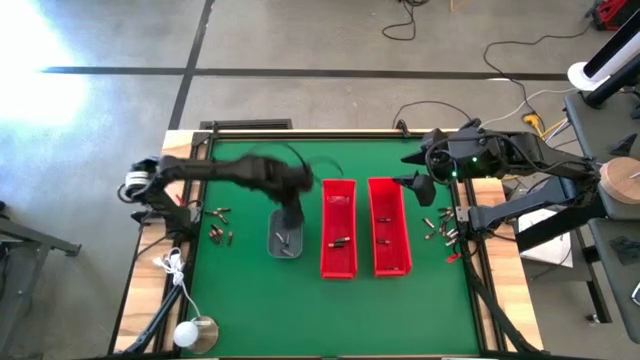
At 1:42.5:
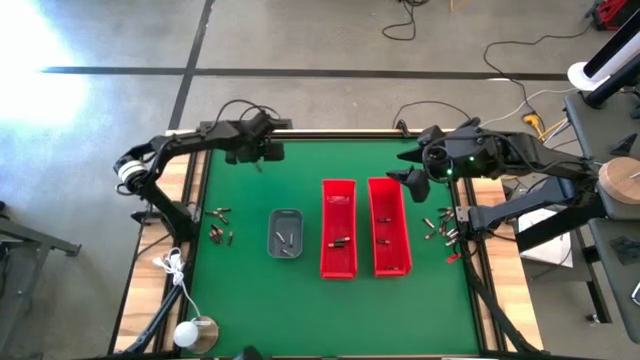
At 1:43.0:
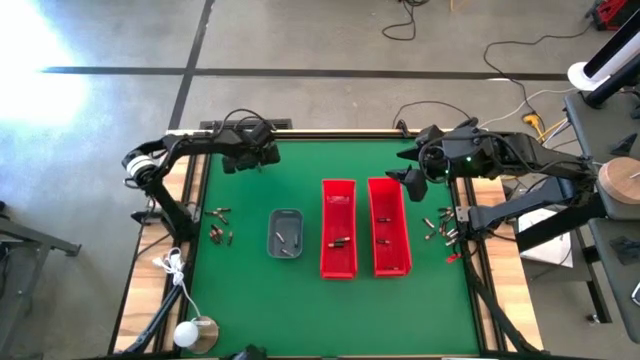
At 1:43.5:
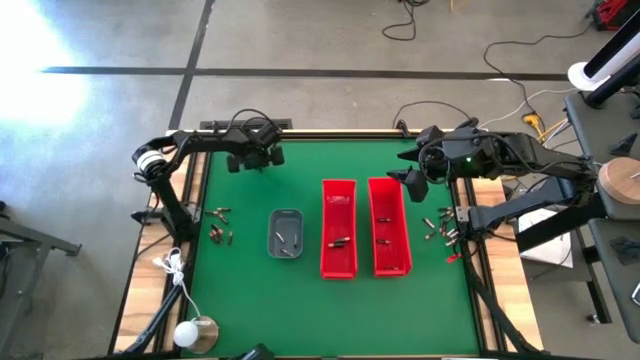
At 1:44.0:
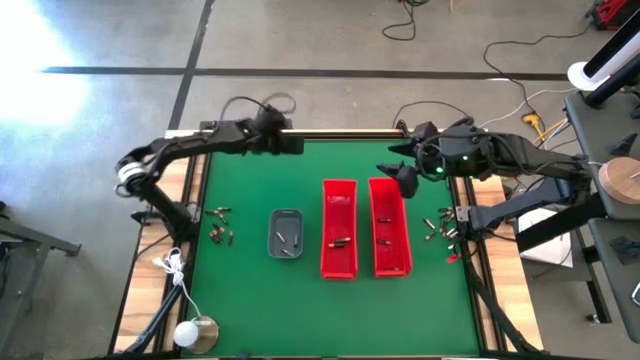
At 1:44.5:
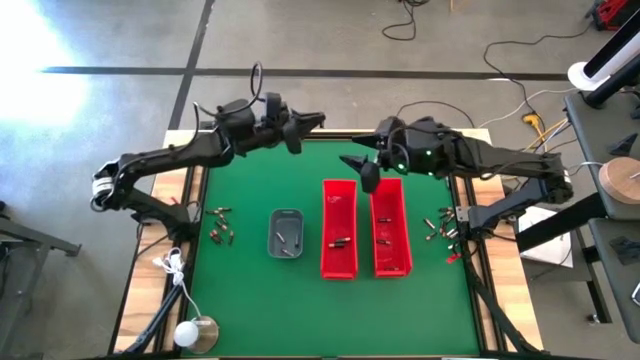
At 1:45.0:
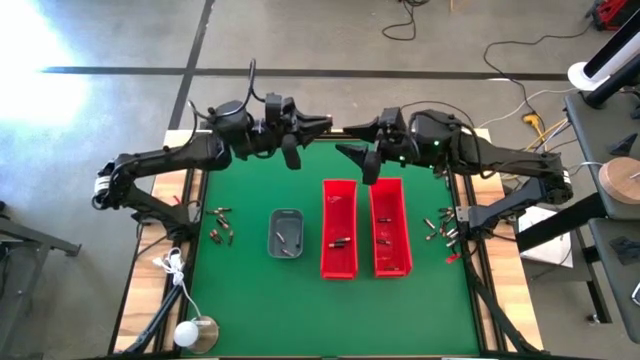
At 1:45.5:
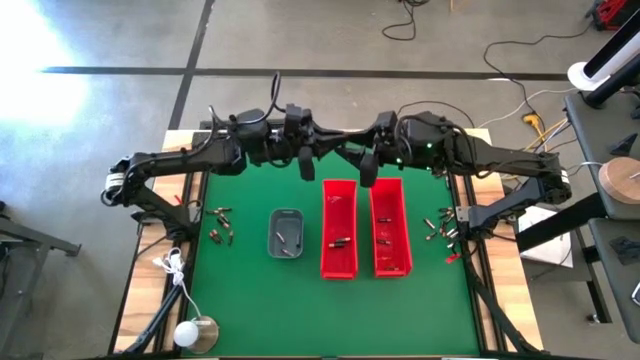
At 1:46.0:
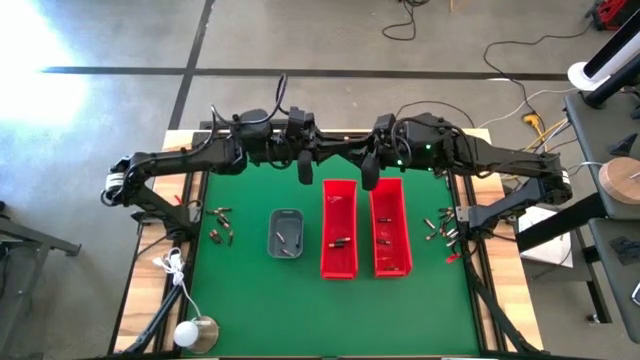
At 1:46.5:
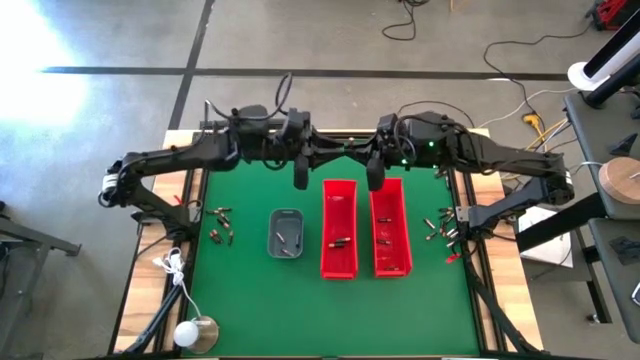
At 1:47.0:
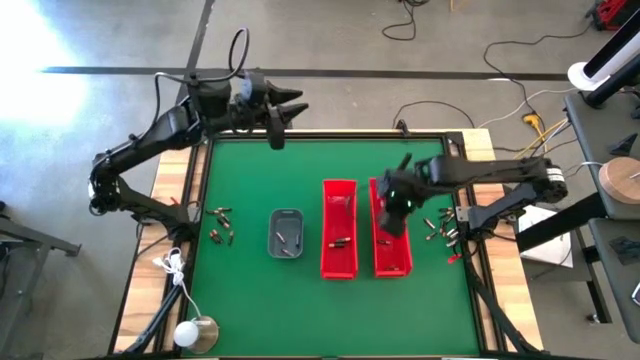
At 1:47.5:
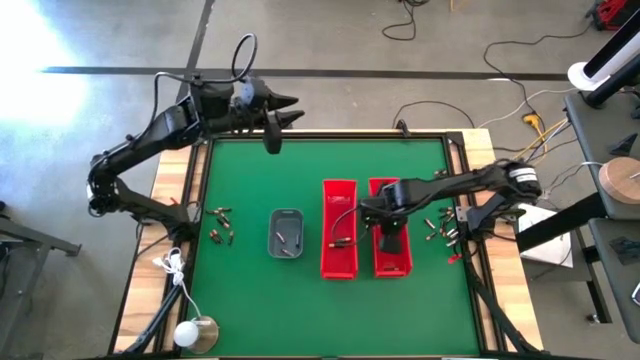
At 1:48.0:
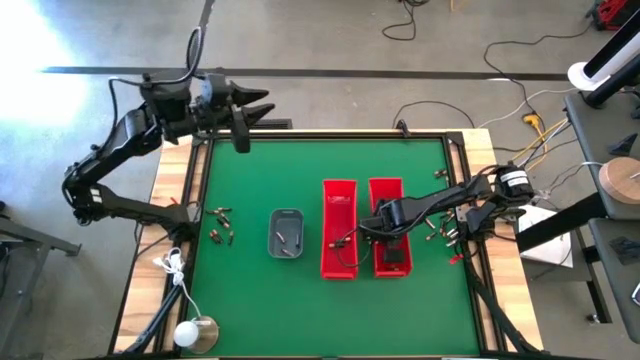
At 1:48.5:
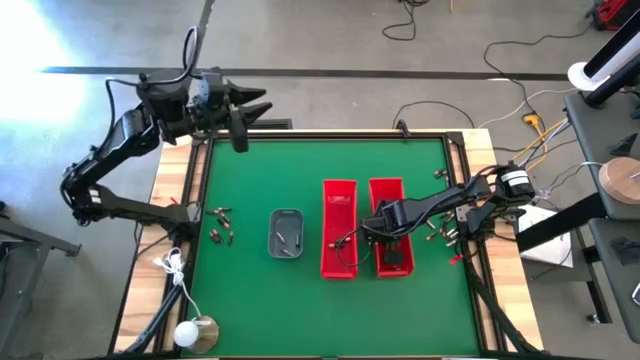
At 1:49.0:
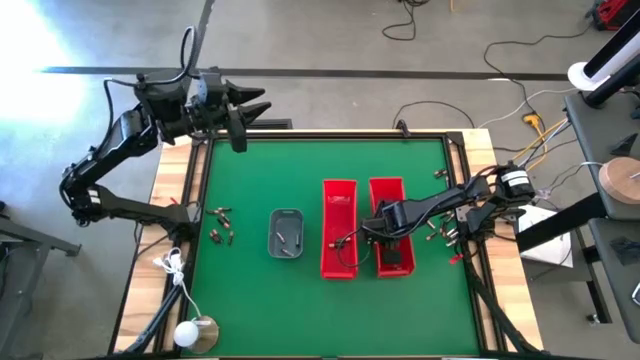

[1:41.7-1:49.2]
Task: Sort batteries
Put the small black battery into the right red bin

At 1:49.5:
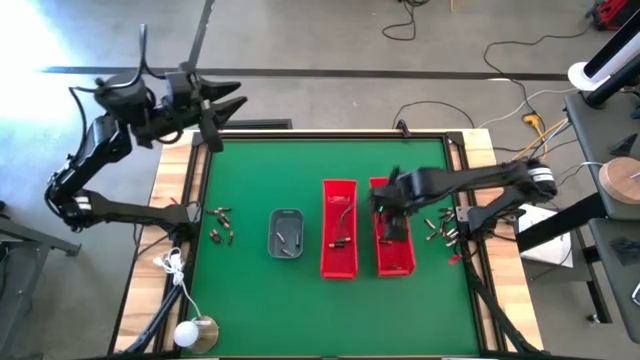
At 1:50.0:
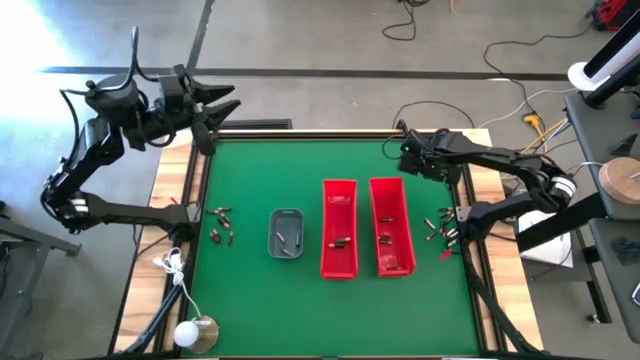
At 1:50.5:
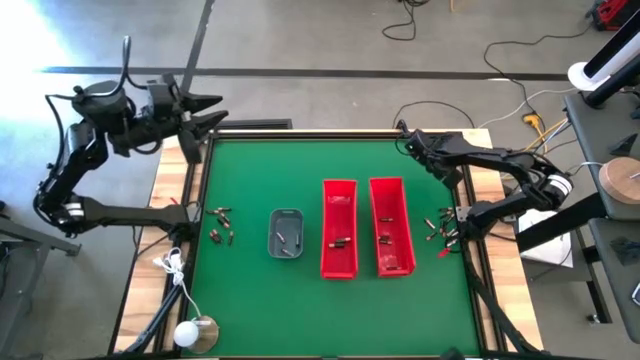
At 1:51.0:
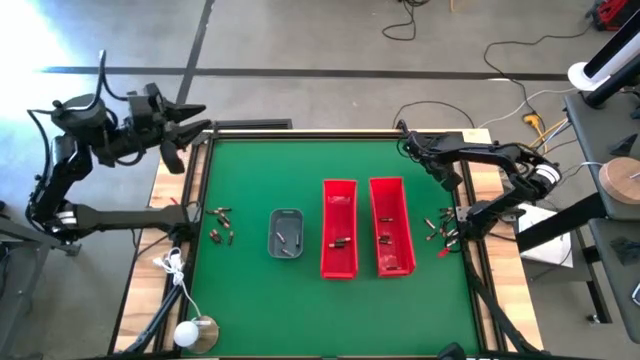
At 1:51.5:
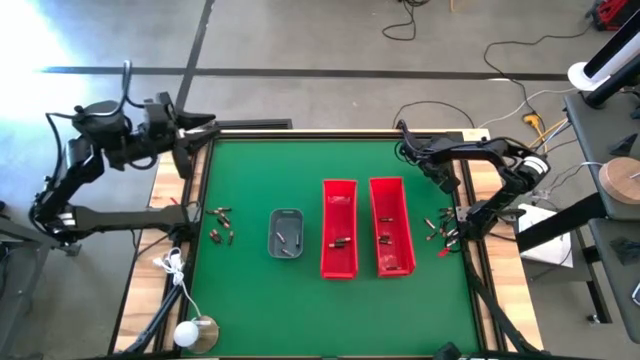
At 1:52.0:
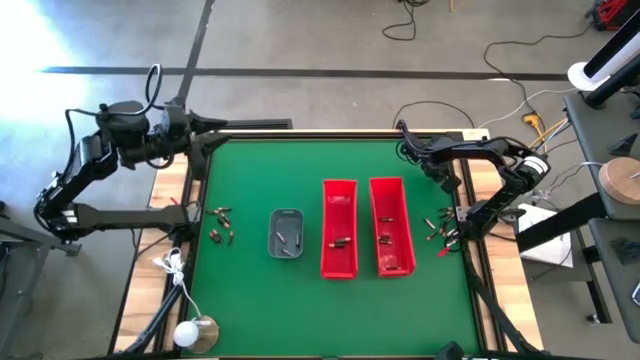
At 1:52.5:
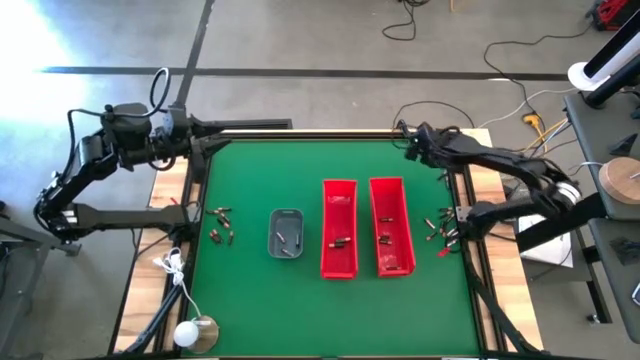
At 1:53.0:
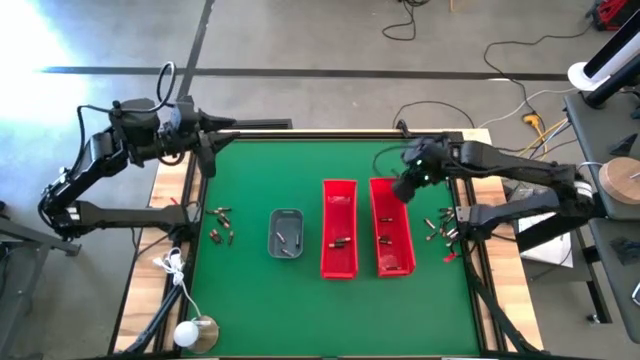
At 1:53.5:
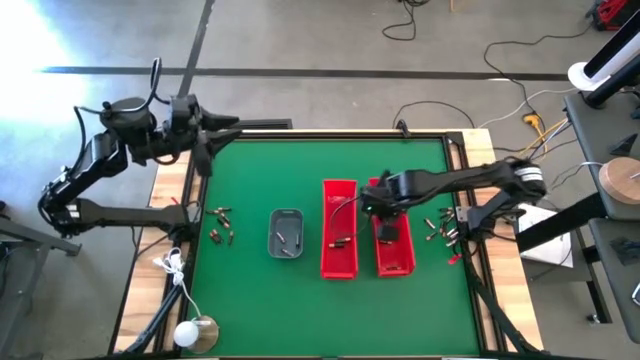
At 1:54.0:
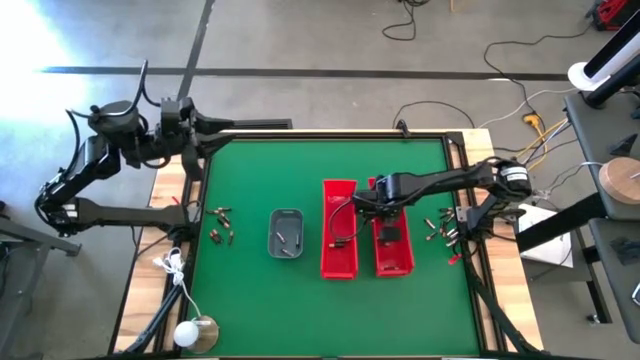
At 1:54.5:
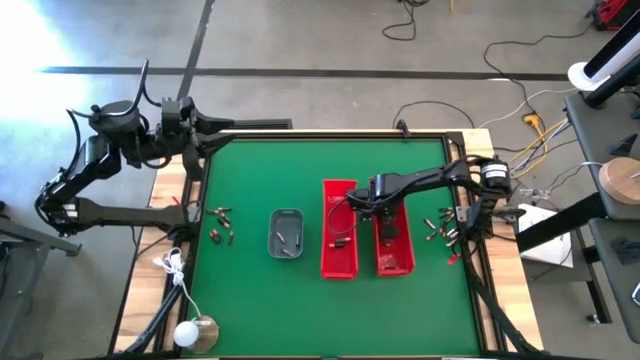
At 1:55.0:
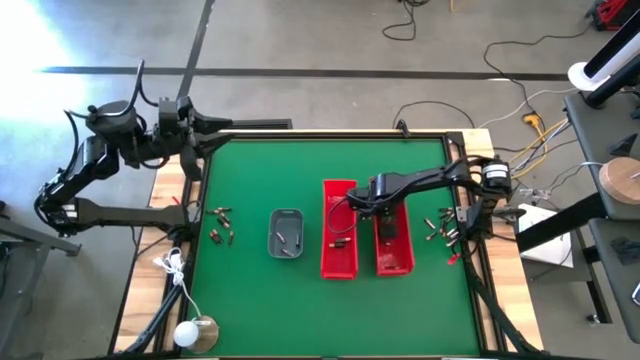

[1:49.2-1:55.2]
Put the small black battery into the right red bin

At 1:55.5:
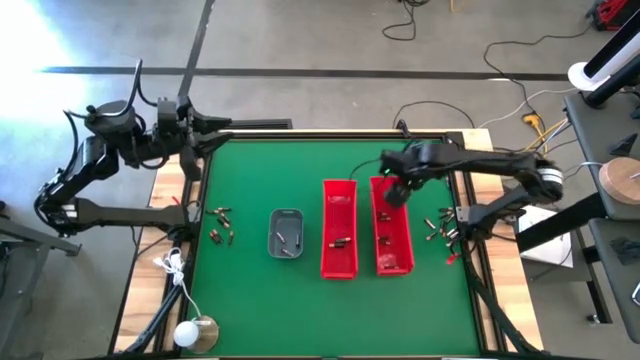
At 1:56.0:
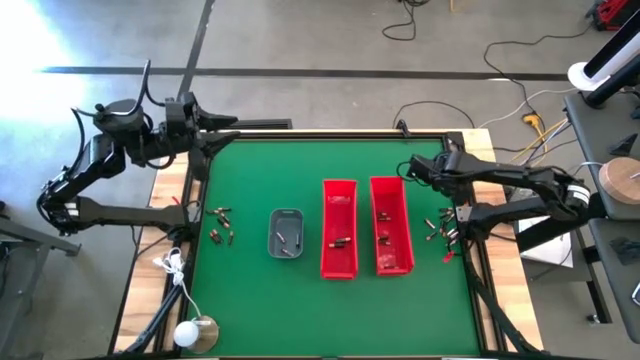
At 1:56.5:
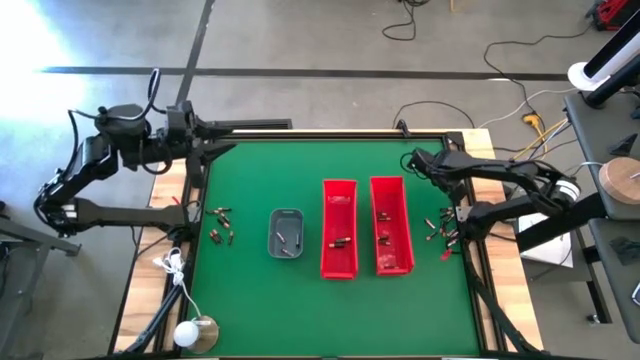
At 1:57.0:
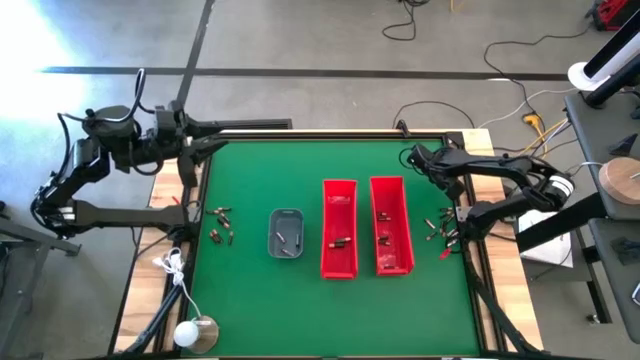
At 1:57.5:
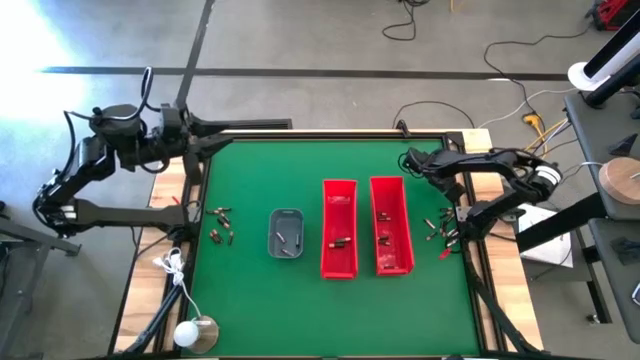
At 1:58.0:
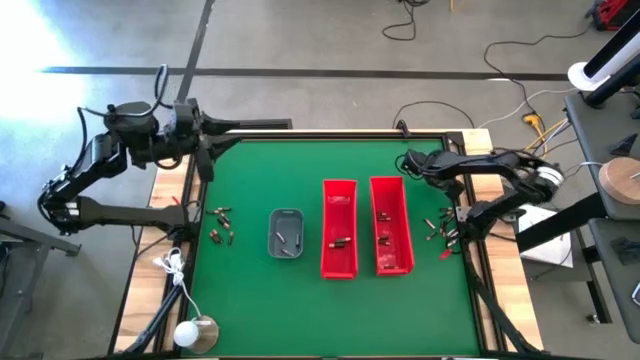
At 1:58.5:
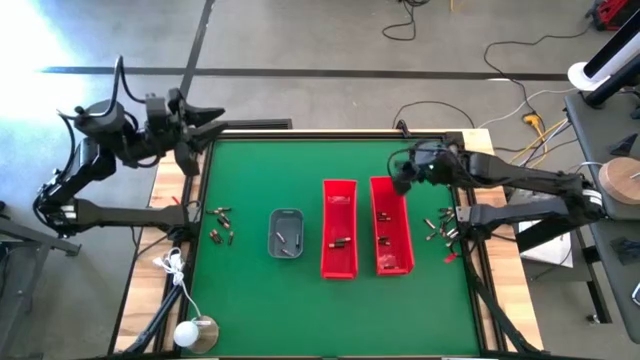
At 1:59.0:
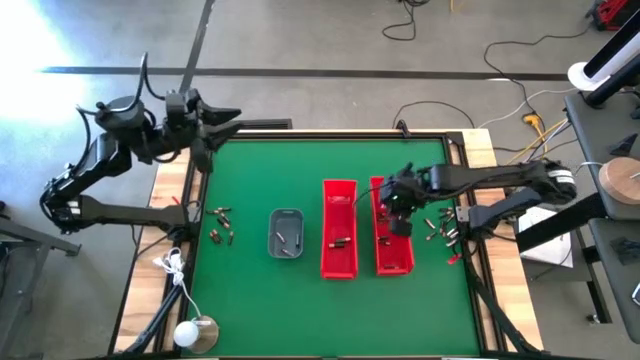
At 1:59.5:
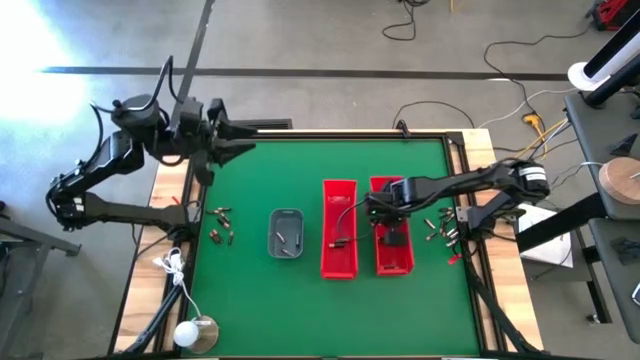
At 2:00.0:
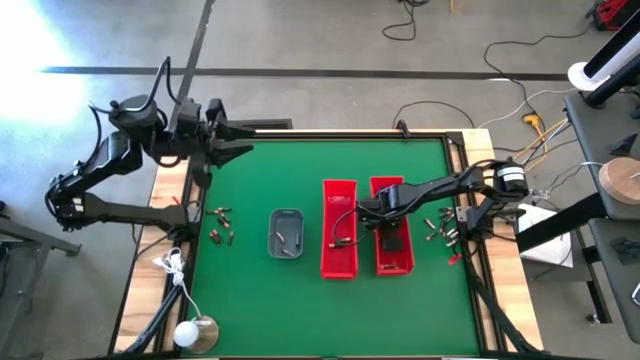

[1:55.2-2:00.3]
Put the small black battery into the right red bin

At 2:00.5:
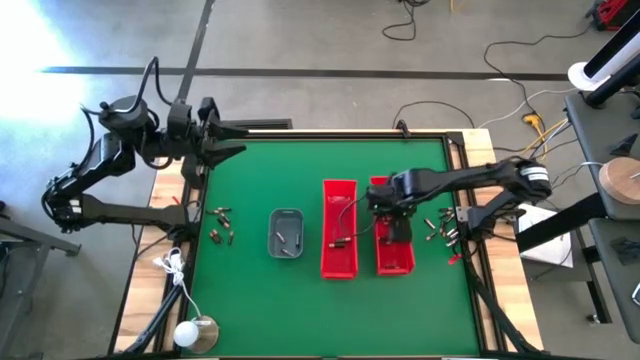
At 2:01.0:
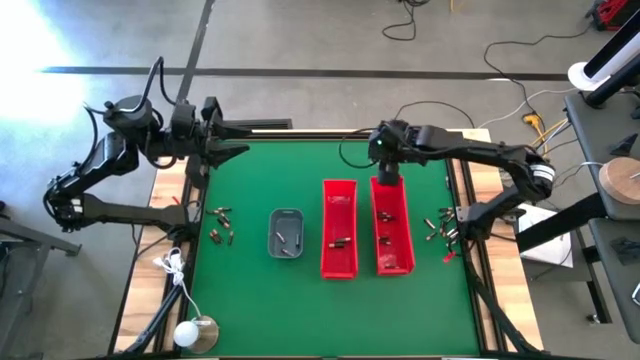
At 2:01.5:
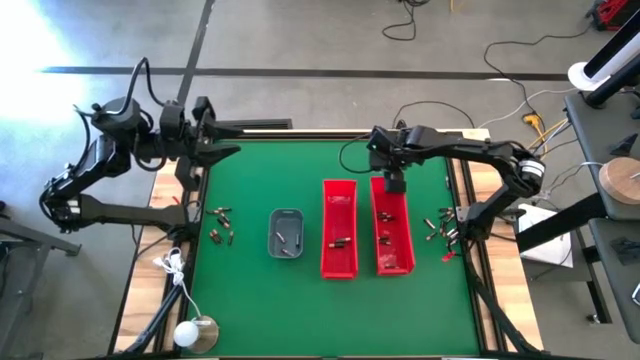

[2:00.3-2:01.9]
Adjust the right red bin on the table

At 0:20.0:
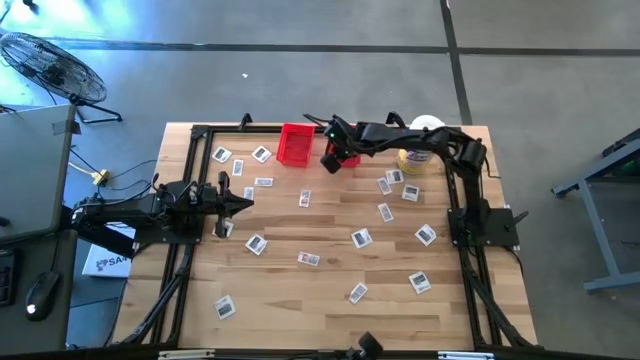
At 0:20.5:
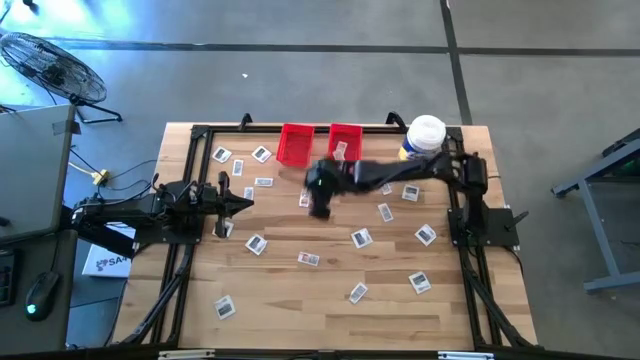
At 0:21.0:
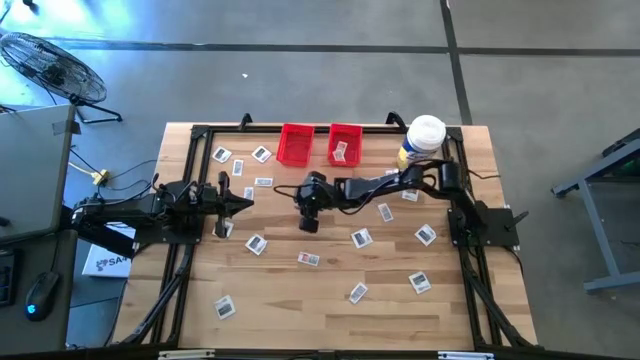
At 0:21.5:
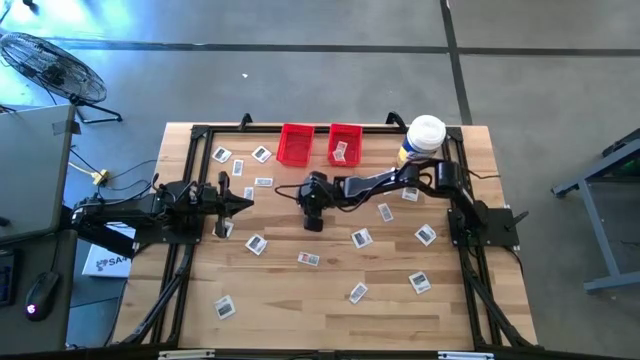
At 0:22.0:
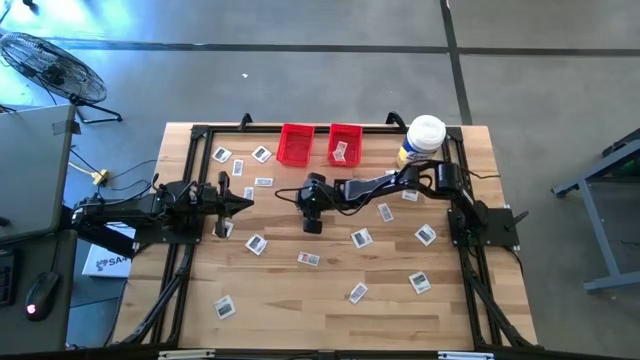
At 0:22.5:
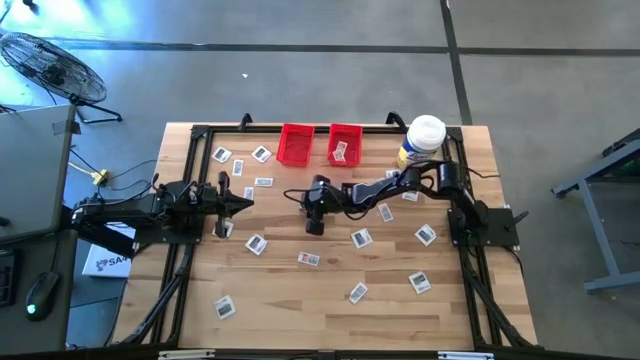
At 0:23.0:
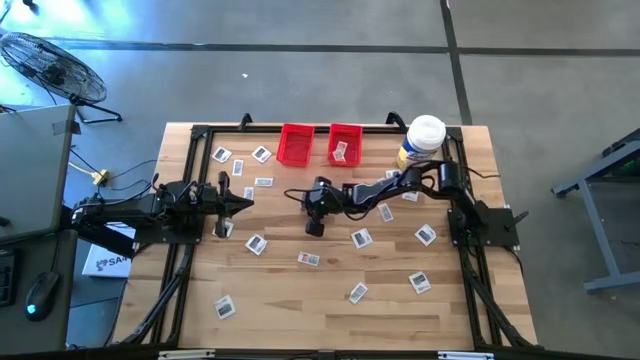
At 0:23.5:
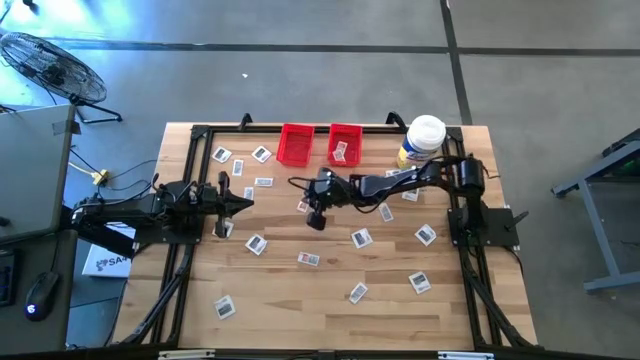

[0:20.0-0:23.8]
Task: Pick & Place First Aid Supplies
Put the ointment pack into the right red bin
